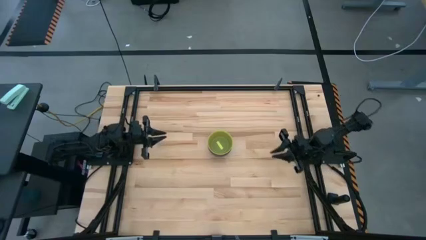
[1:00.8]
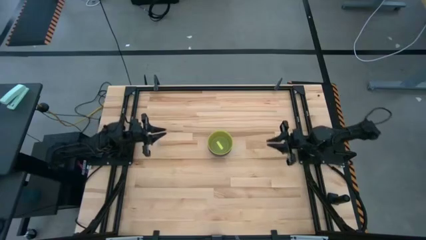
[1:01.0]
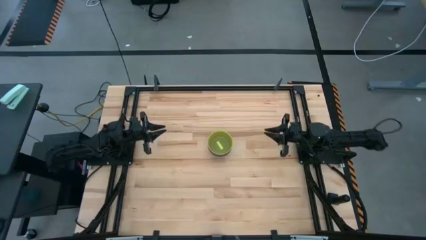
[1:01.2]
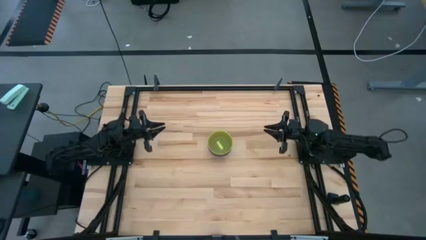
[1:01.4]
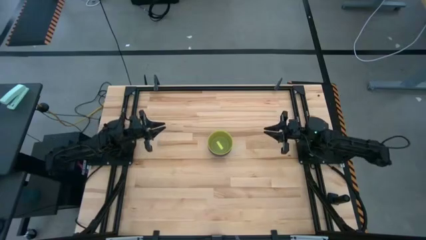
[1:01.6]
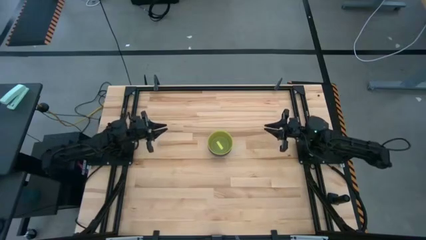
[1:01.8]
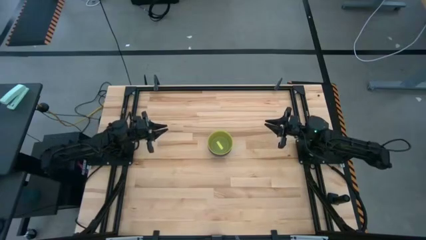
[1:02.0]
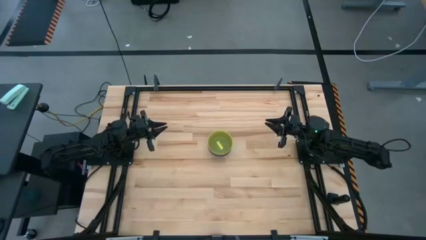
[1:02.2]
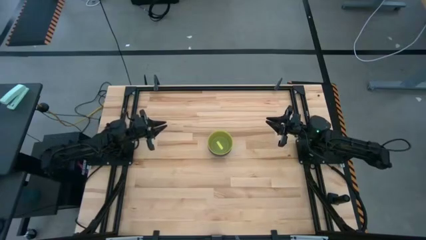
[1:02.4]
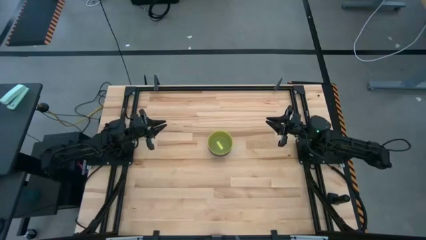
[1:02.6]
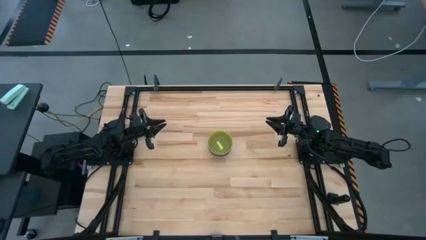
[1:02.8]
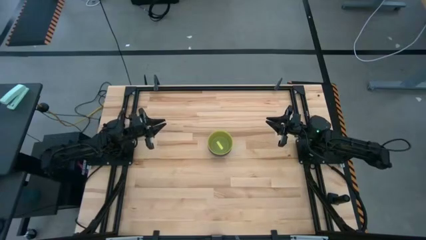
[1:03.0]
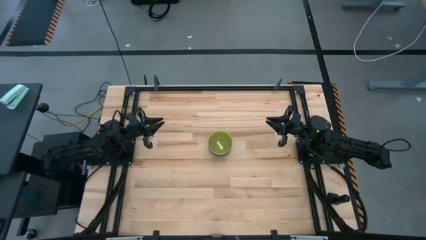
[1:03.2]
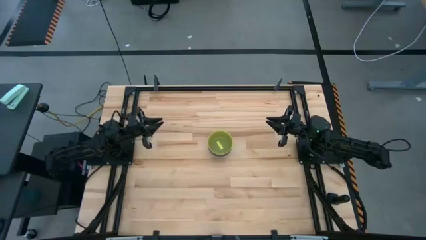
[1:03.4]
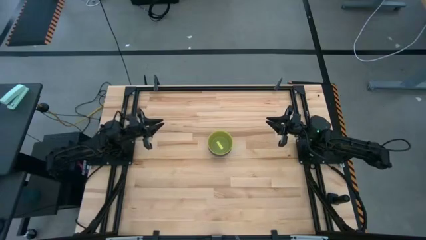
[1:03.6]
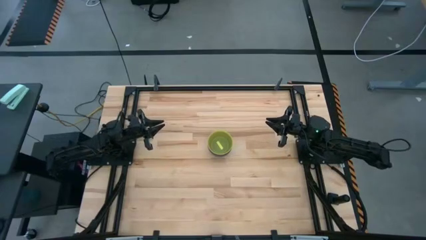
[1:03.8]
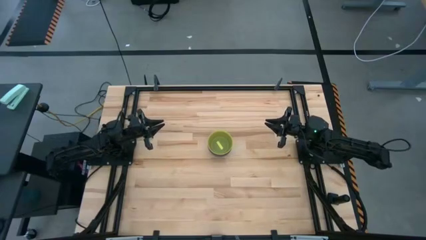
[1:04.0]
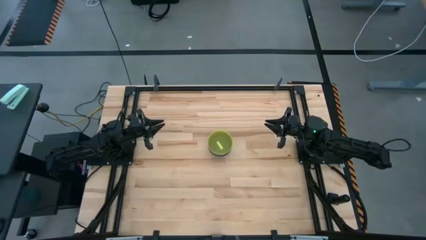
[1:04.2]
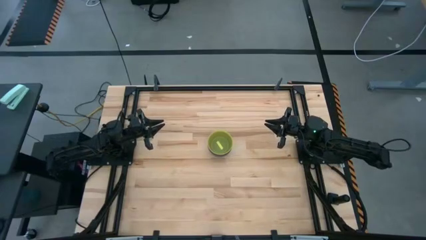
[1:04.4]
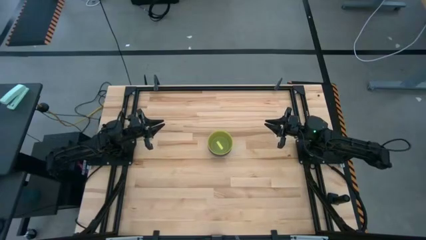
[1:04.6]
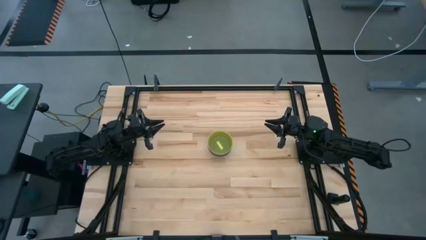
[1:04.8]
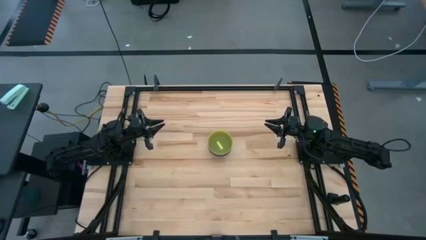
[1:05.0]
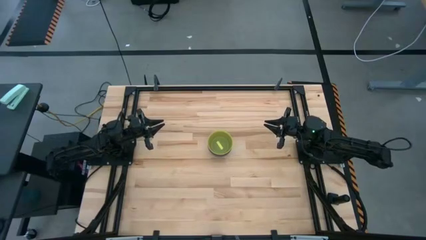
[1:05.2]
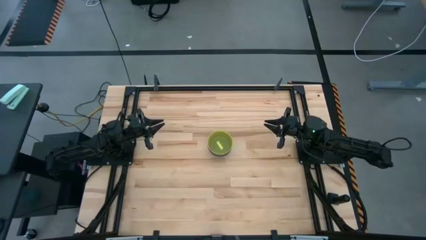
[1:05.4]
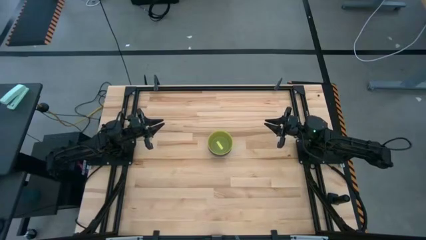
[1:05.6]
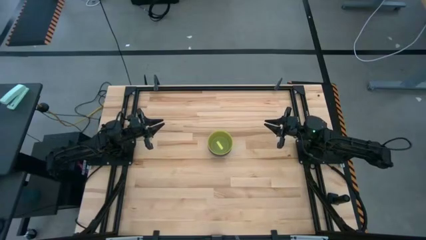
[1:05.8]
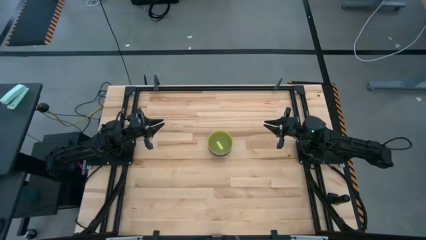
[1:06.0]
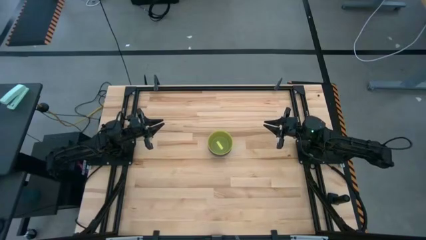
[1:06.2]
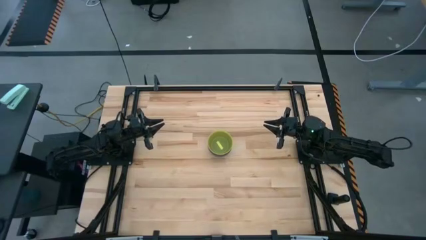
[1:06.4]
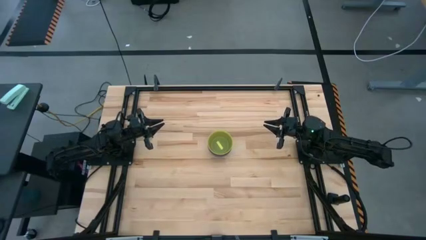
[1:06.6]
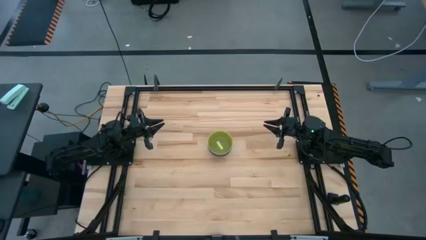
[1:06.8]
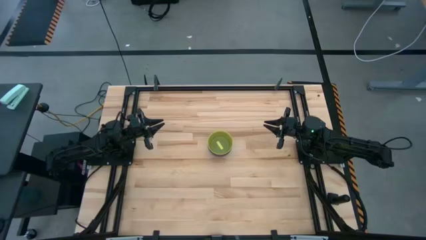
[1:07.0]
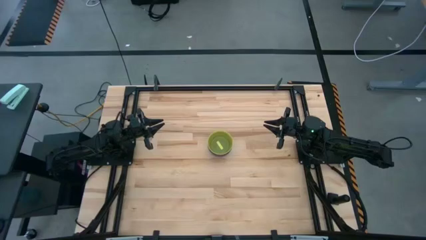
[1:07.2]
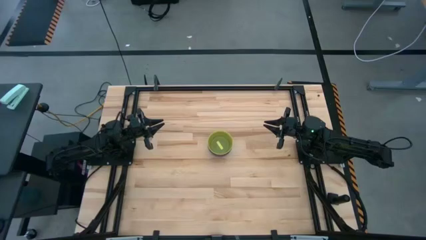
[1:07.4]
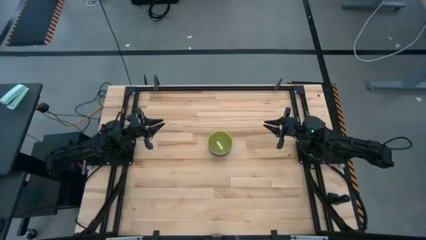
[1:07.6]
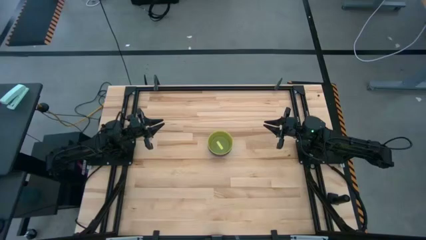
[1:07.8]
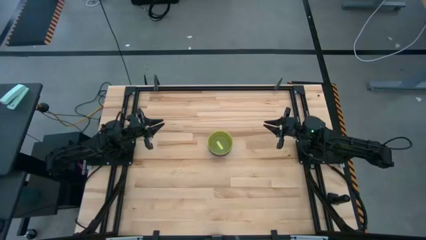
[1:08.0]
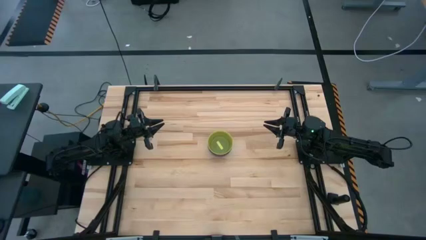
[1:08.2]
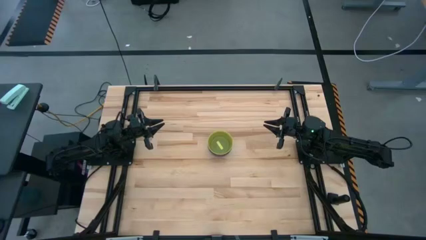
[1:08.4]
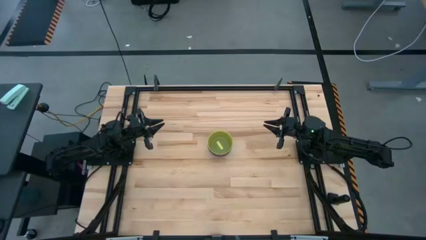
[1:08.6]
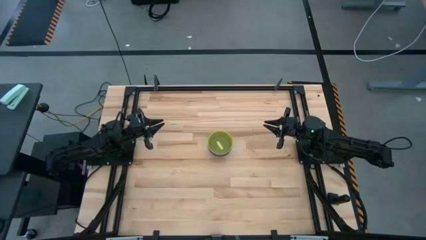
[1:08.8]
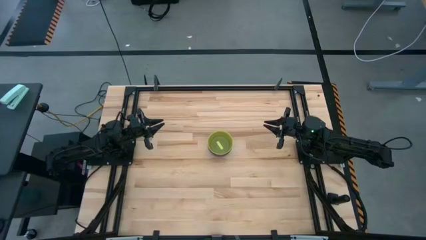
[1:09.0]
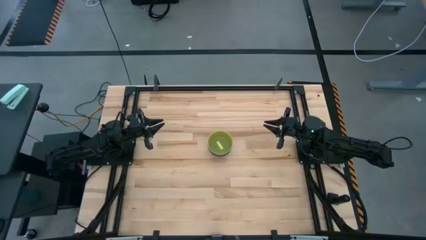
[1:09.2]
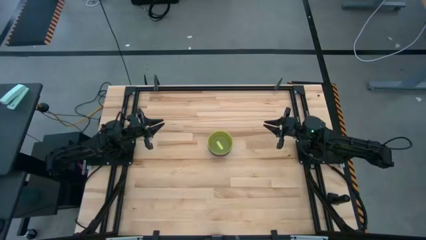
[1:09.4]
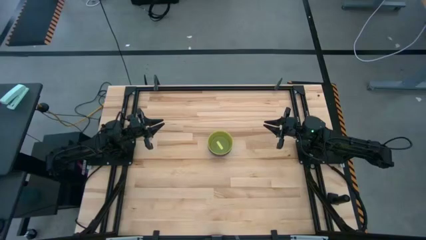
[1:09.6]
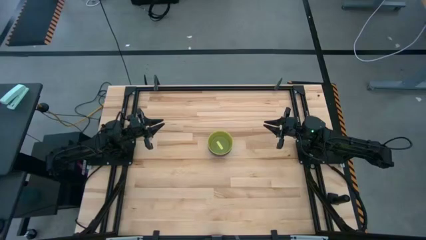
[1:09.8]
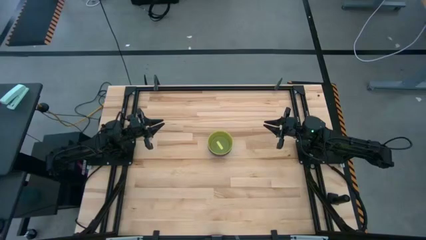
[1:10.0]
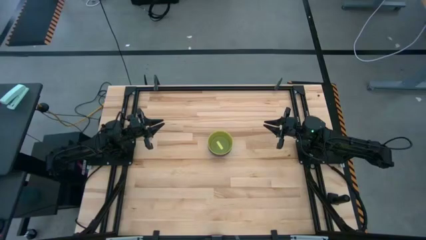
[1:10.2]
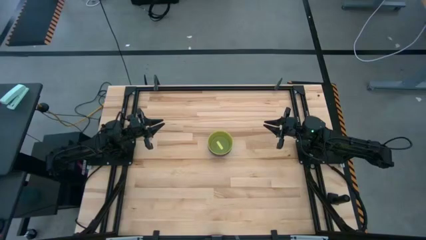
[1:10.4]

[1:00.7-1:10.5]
Task: Nest bowls inside each other
Return to Home Position

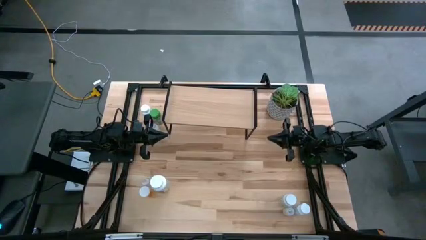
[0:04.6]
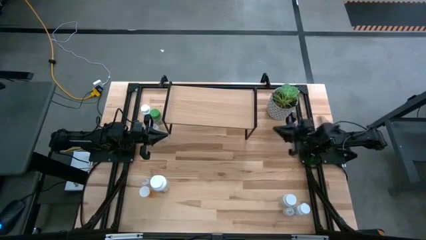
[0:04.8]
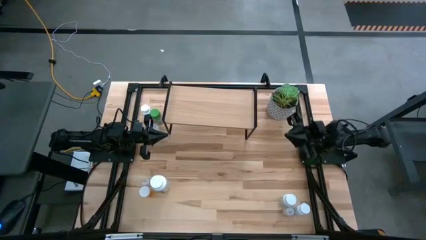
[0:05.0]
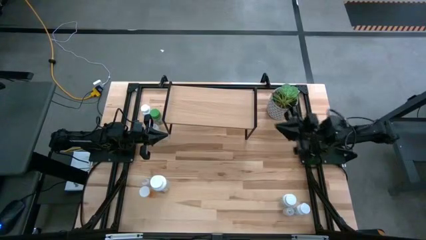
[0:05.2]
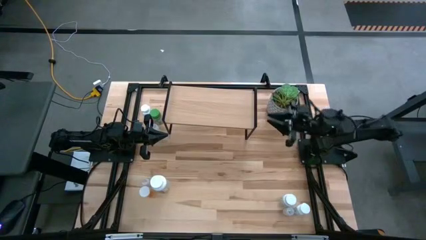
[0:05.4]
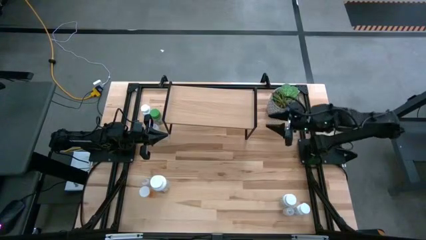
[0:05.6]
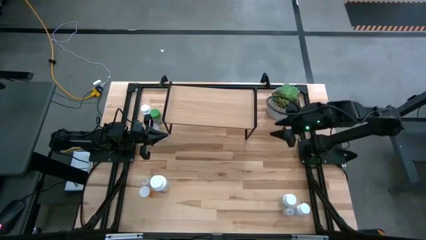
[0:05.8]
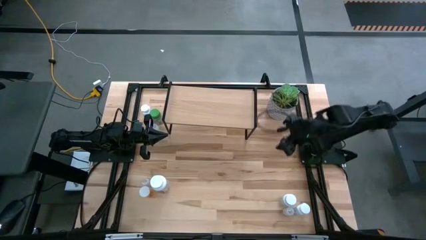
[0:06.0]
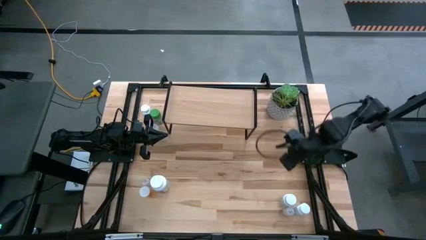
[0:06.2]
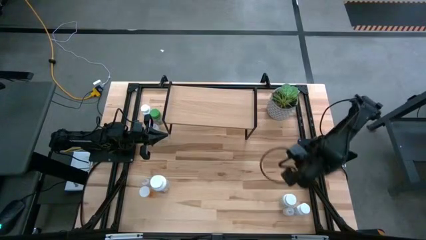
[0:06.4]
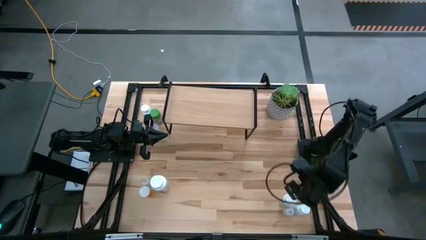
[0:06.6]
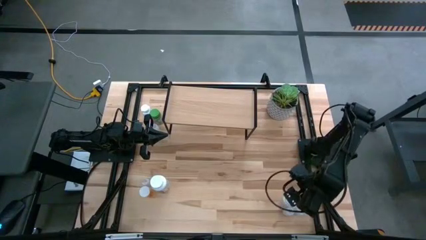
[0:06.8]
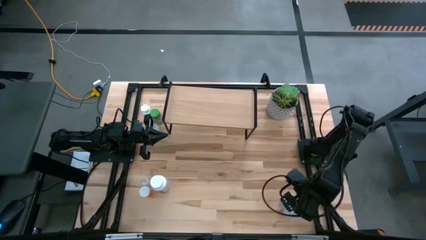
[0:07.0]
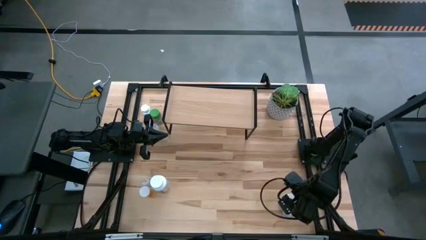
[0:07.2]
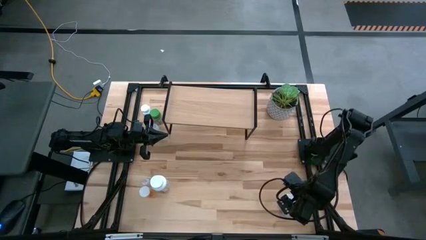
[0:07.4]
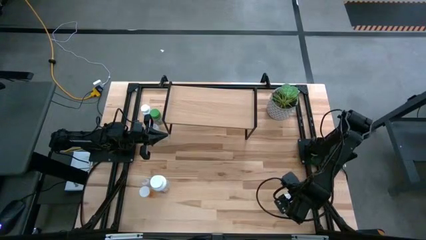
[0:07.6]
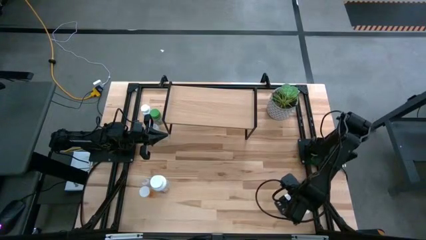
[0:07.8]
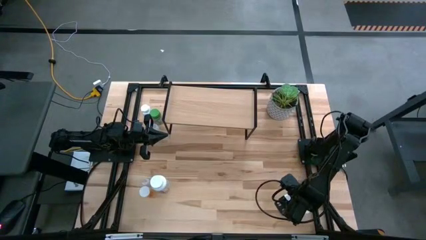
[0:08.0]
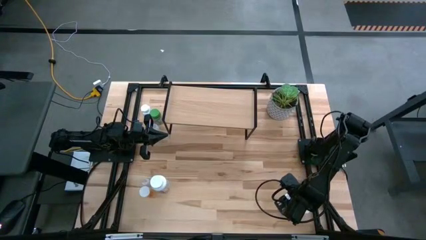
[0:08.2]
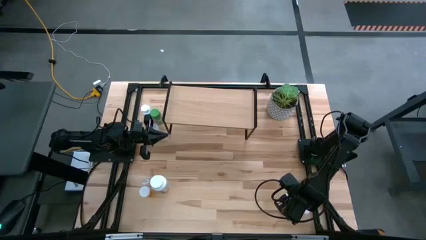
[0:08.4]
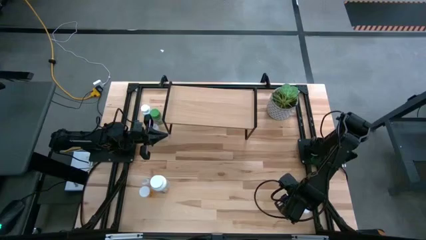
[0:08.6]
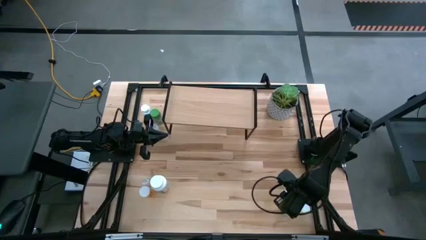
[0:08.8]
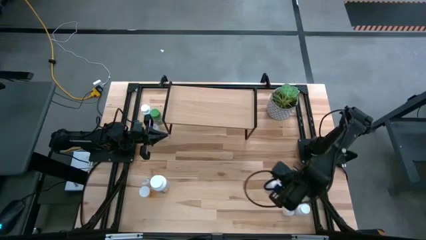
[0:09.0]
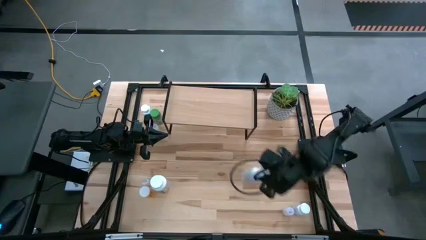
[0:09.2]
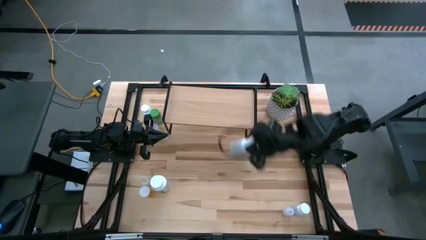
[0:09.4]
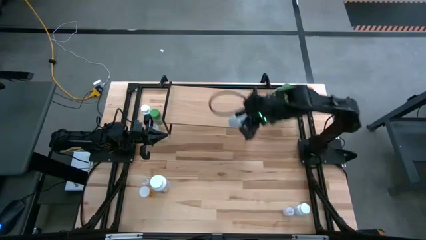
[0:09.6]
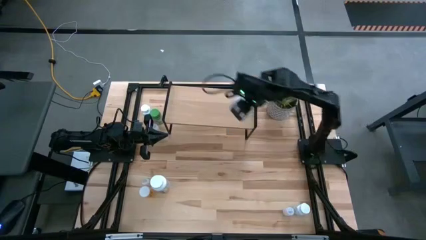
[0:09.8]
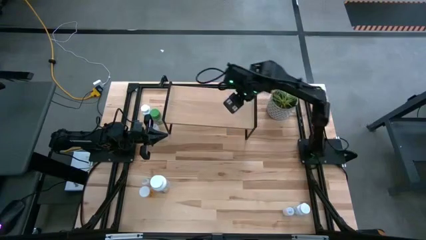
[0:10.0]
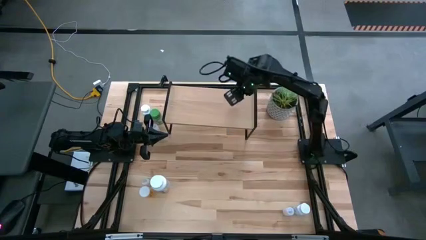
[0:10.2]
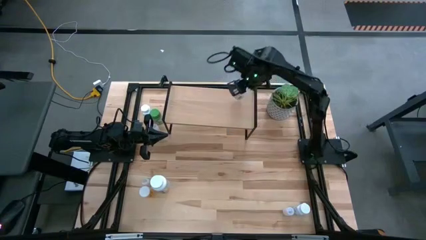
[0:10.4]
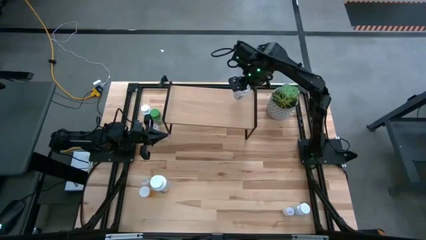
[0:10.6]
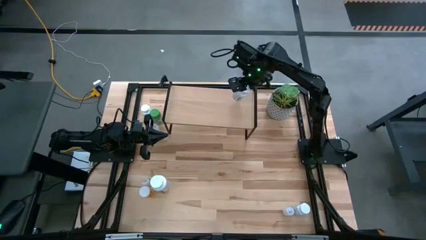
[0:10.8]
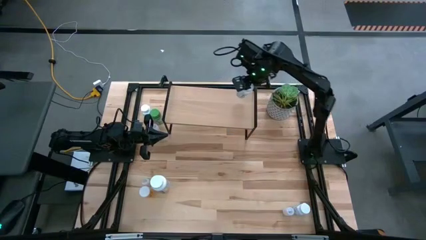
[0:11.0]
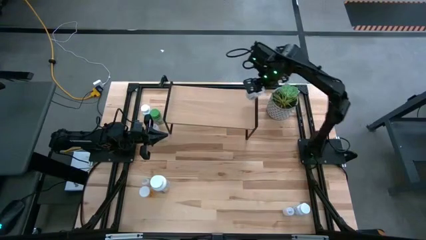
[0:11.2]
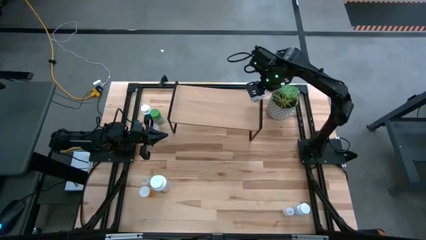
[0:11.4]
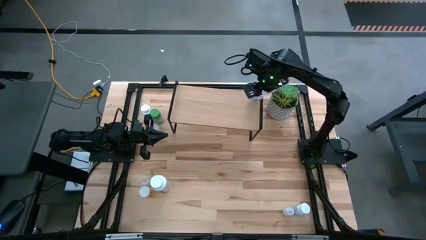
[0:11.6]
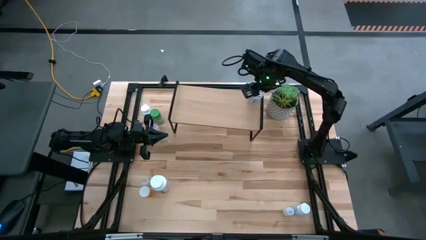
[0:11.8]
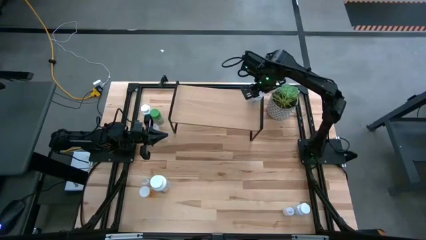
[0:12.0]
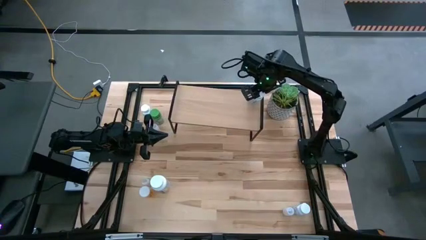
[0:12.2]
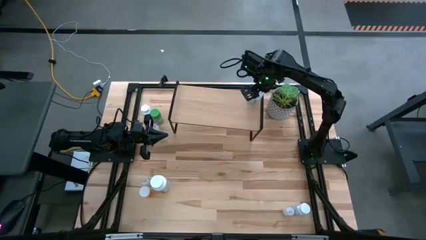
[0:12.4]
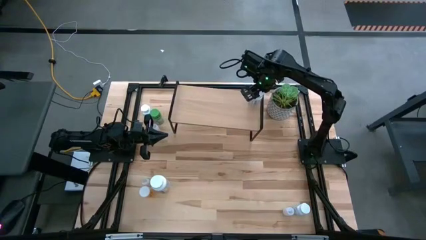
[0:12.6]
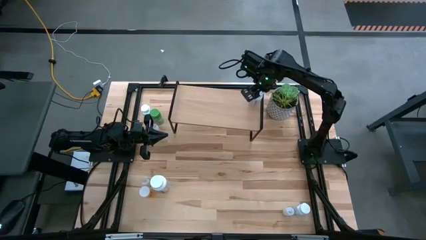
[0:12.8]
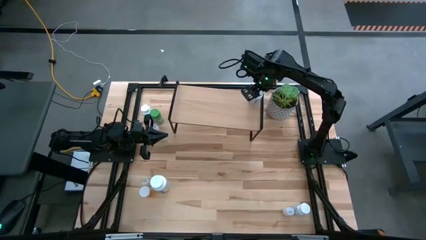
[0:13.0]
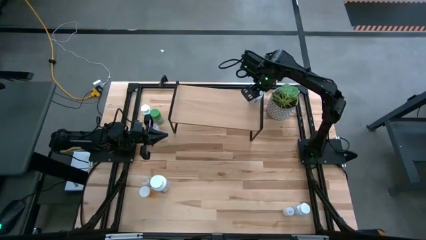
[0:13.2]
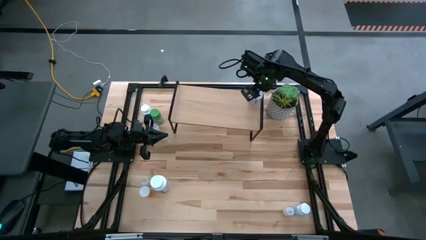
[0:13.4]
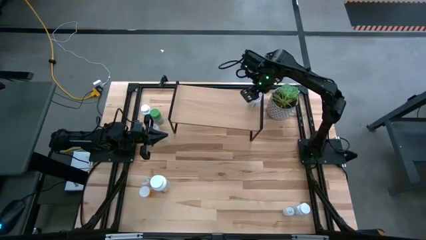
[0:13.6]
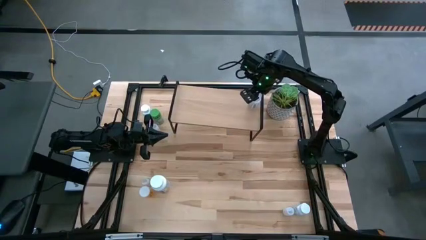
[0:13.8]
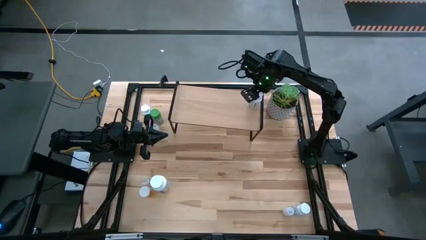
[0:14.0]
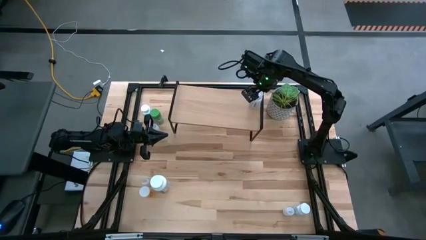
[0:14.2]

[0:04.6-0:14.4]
Task: Pick and place medicine bottles onto shelf by color
Put the white medicine bottle on the shelf
